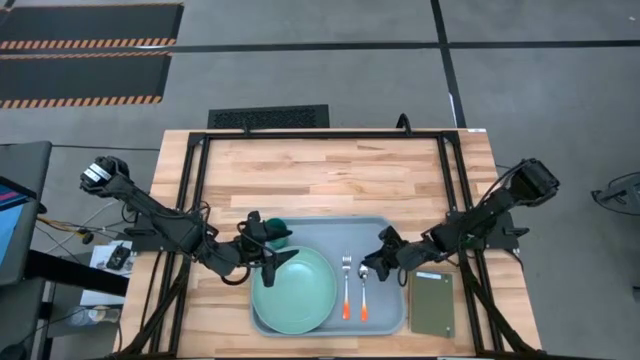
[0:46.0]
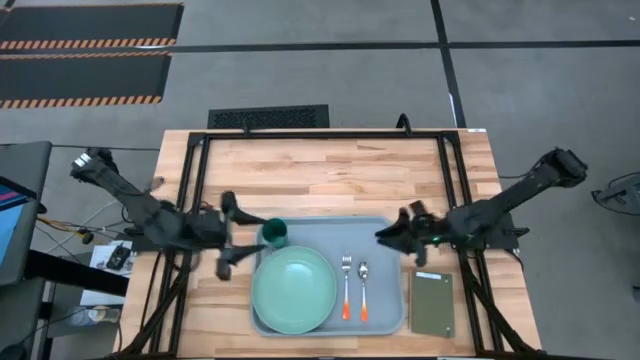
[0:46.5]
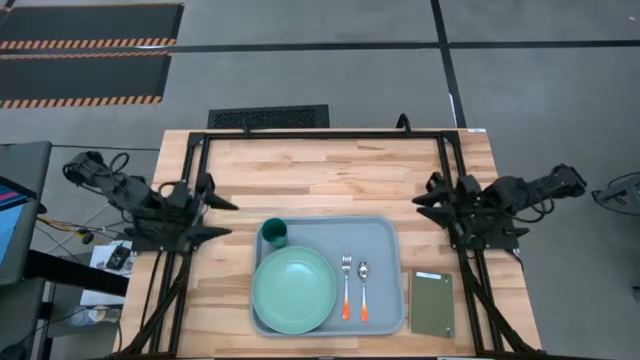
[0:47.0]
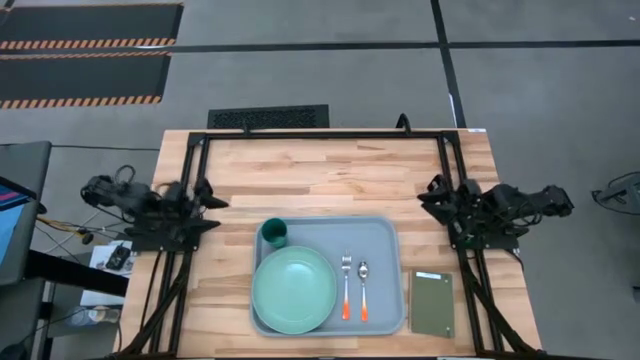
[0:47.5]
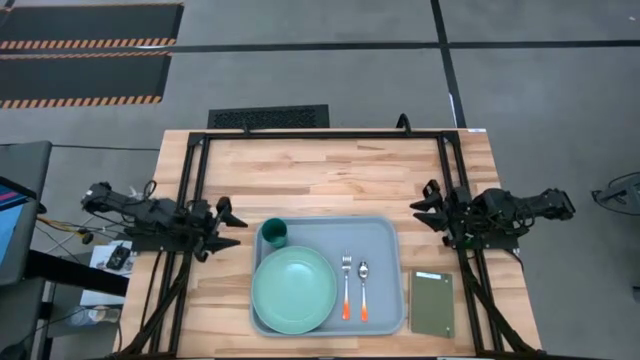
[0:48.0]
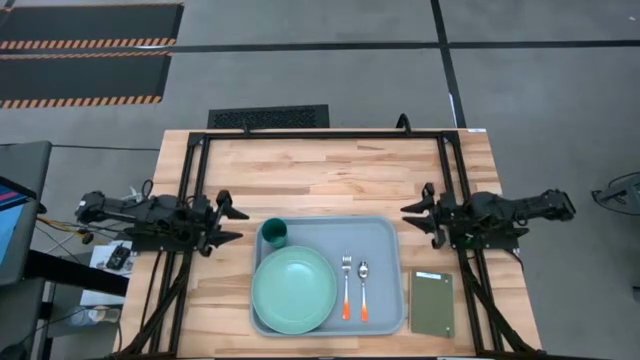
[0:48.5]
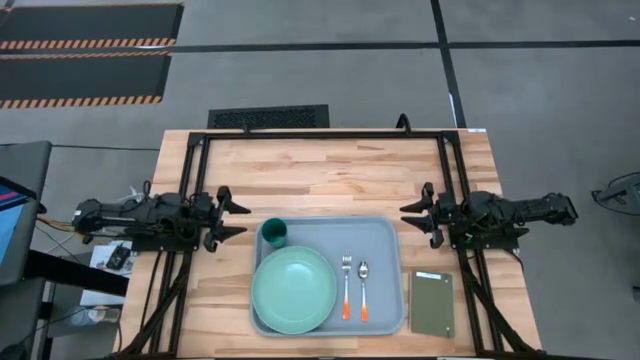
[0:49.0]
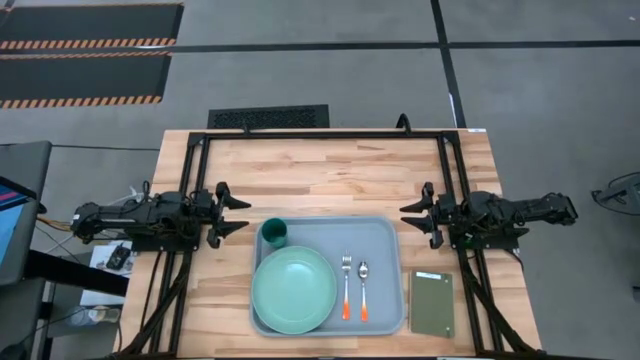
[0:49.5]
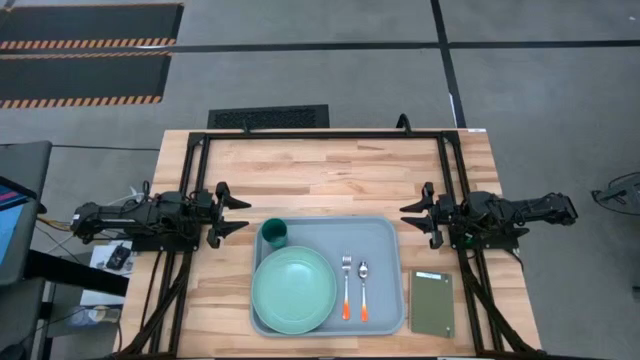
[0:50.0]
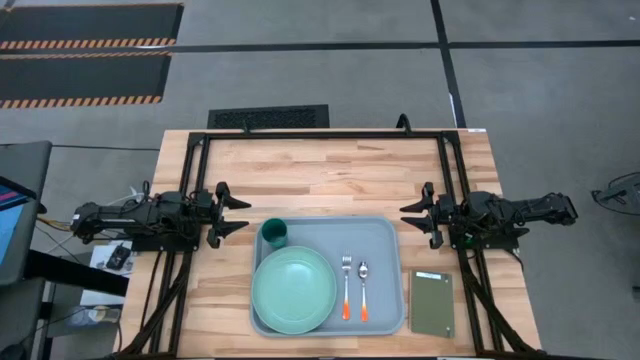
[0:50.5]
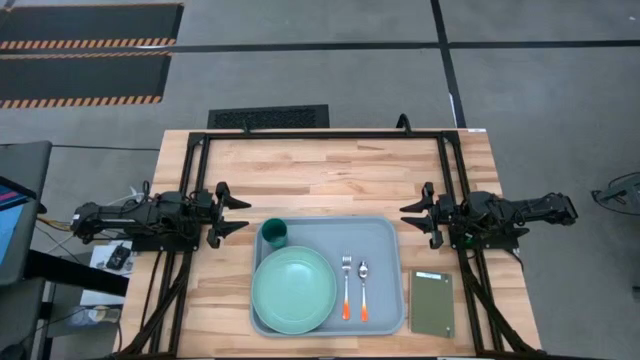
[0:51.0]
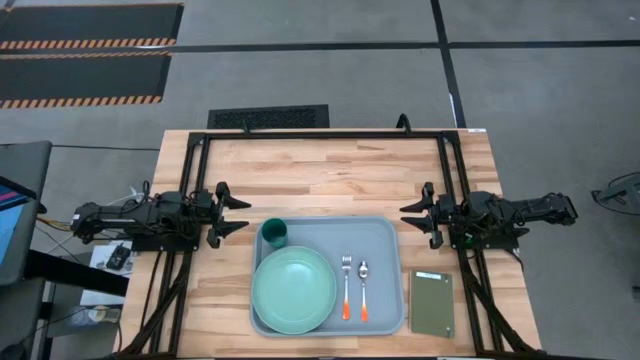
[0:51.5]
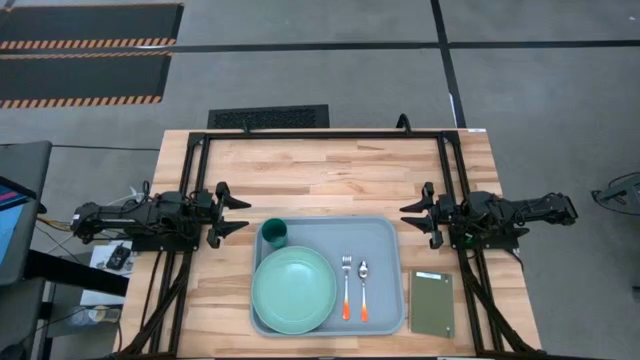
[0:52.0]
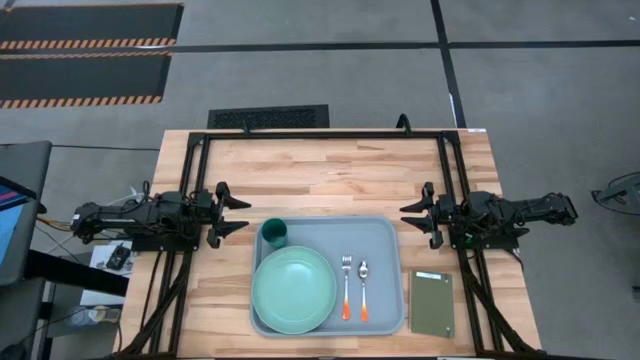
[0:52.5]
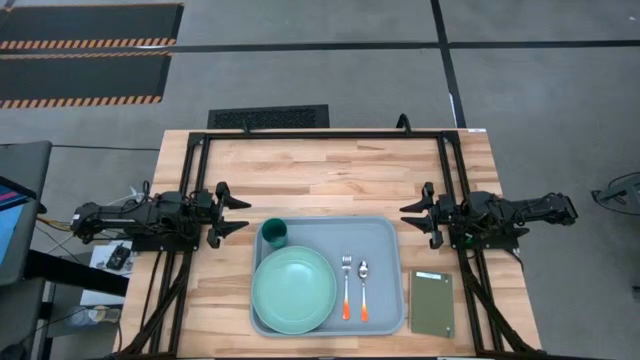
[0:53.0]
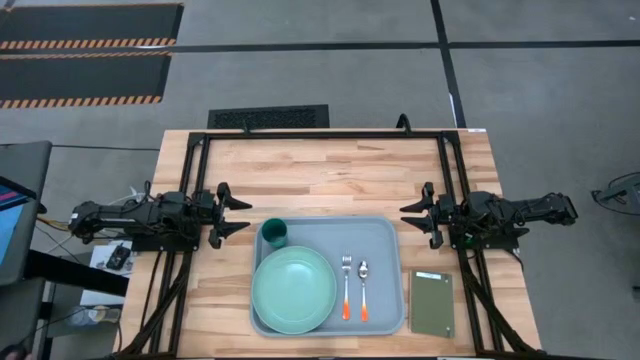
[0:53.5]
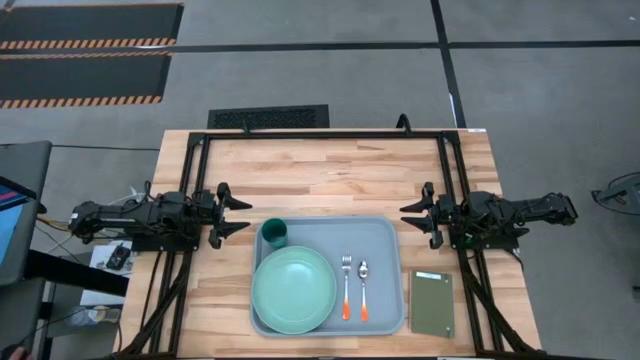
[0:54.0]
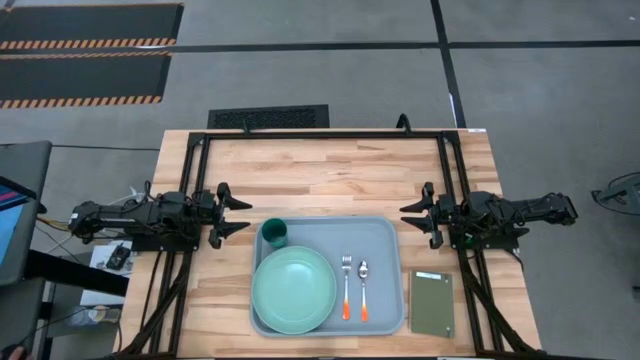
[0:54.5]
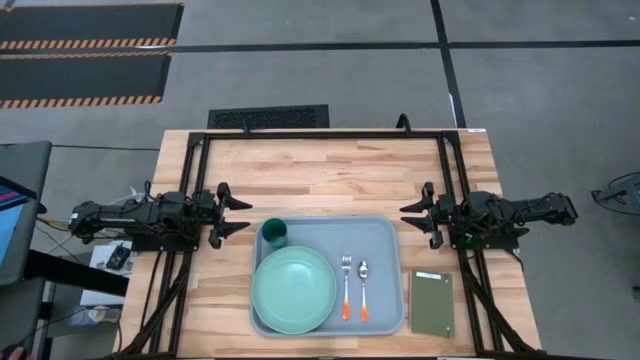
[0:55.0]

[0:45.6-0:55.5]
Task: Pick and place plate/cup/fork/spoon on tray
Return to Home Position

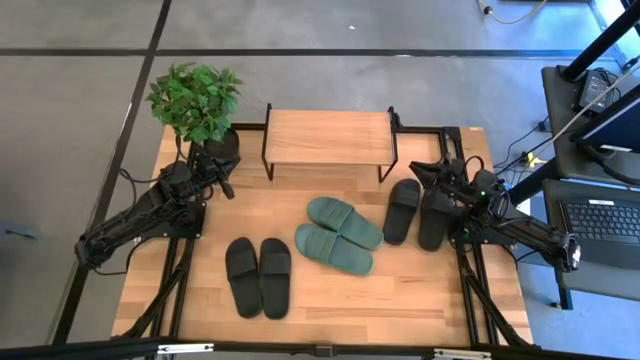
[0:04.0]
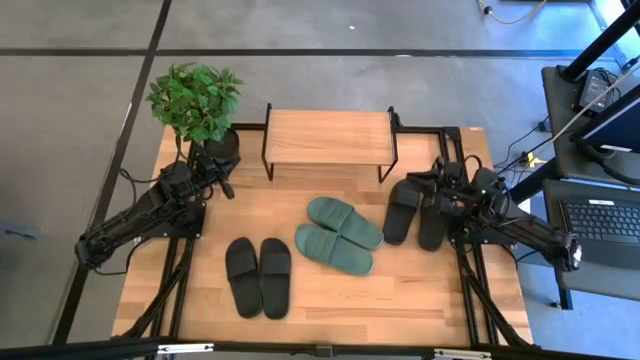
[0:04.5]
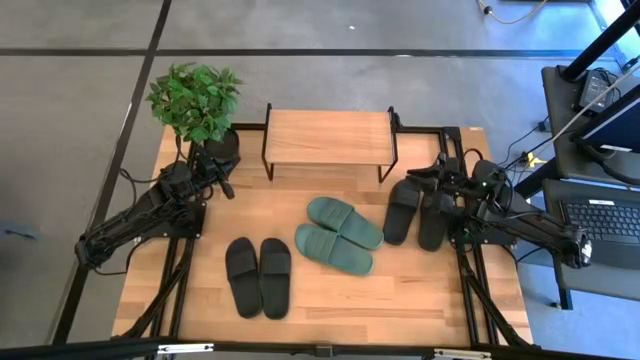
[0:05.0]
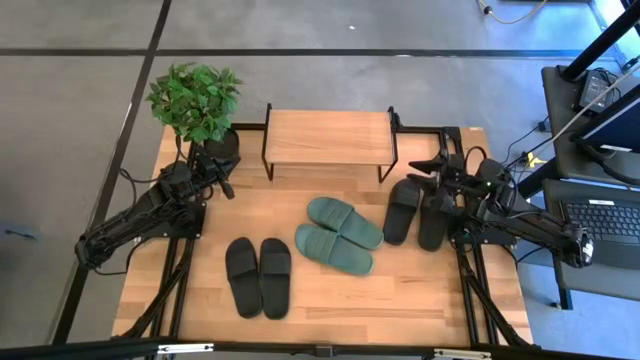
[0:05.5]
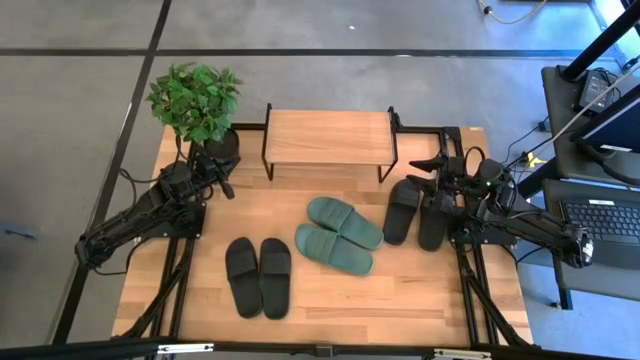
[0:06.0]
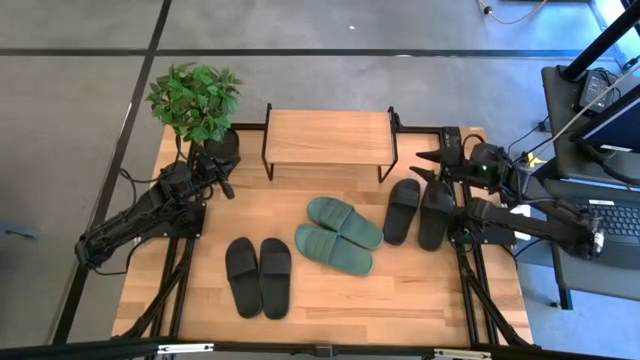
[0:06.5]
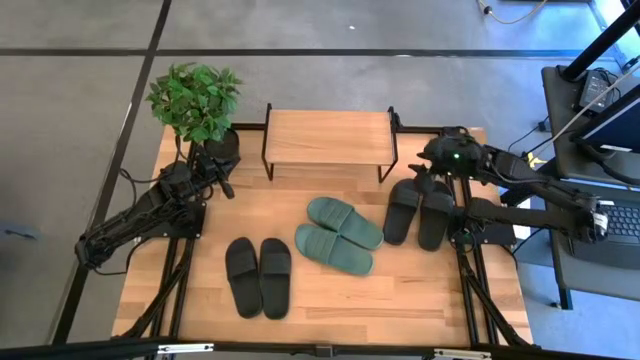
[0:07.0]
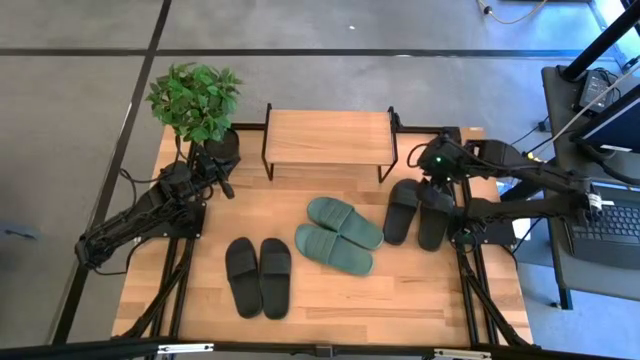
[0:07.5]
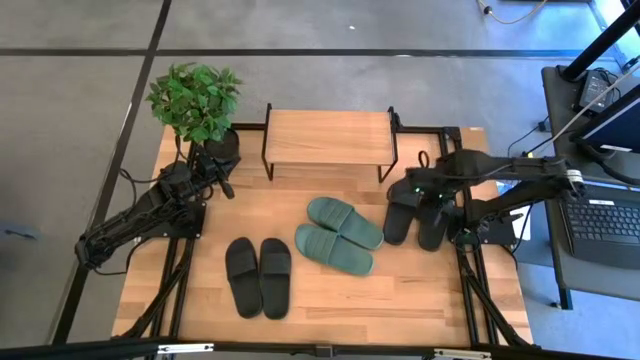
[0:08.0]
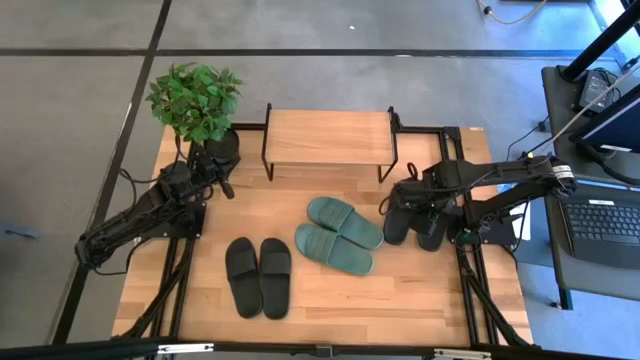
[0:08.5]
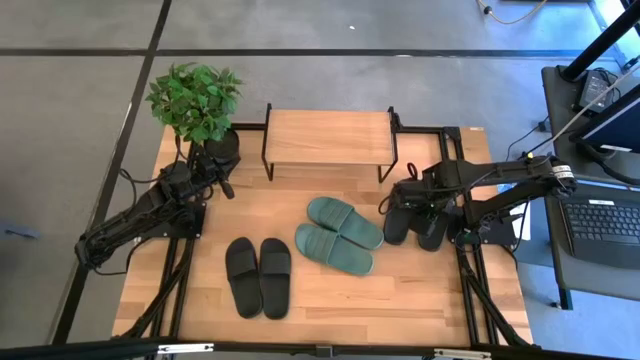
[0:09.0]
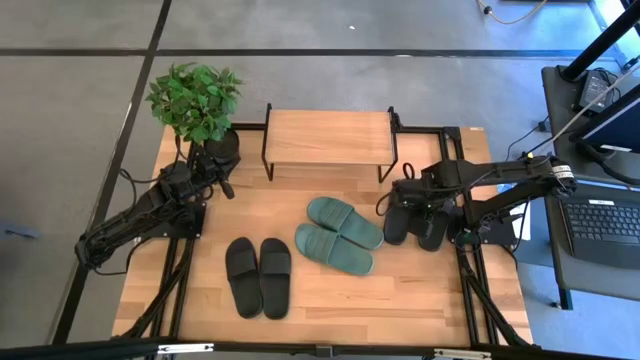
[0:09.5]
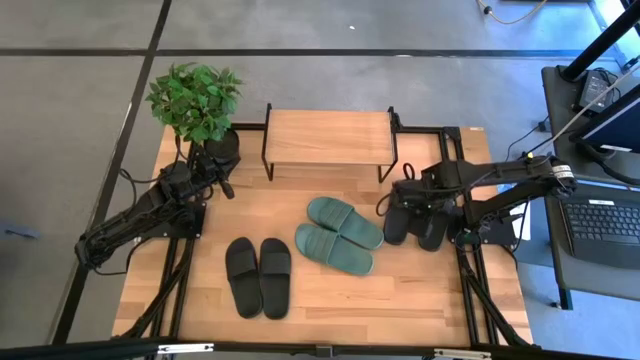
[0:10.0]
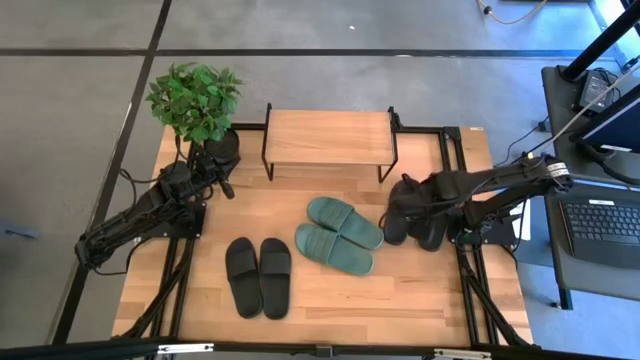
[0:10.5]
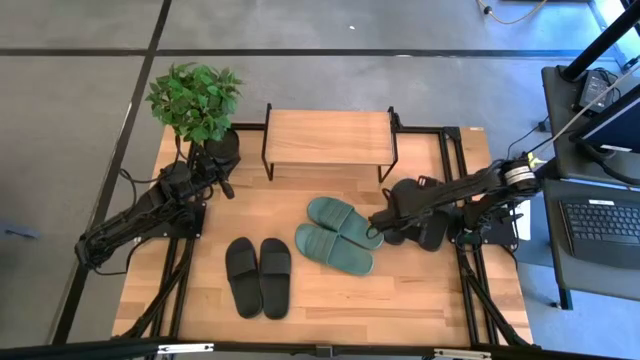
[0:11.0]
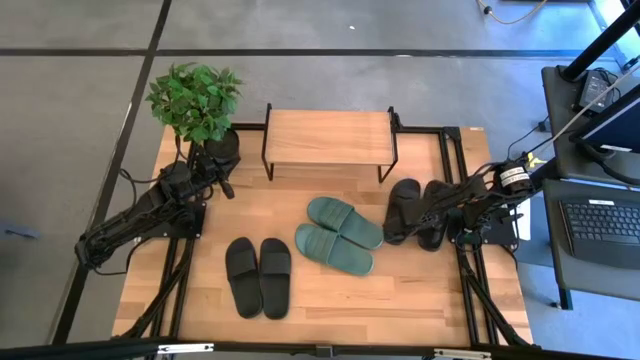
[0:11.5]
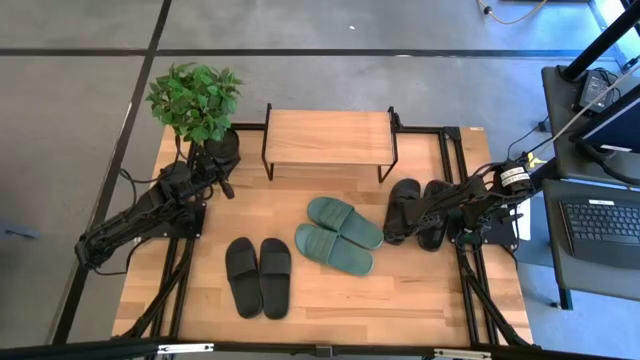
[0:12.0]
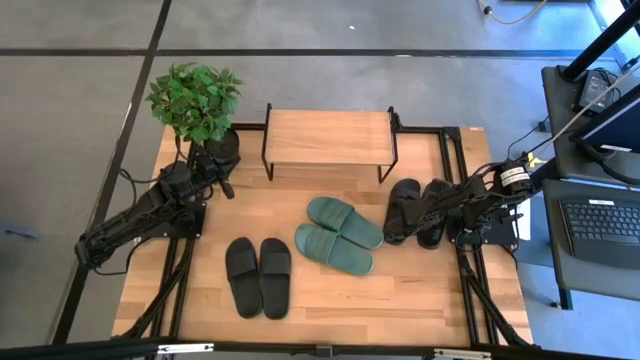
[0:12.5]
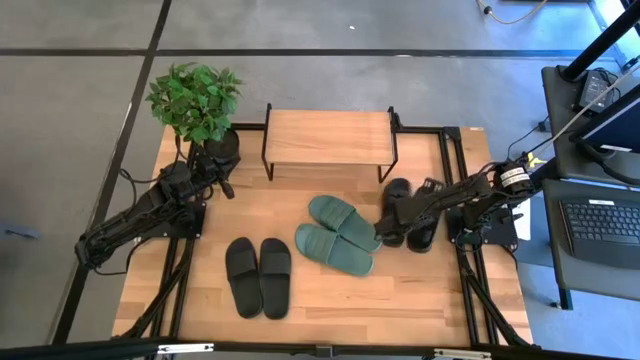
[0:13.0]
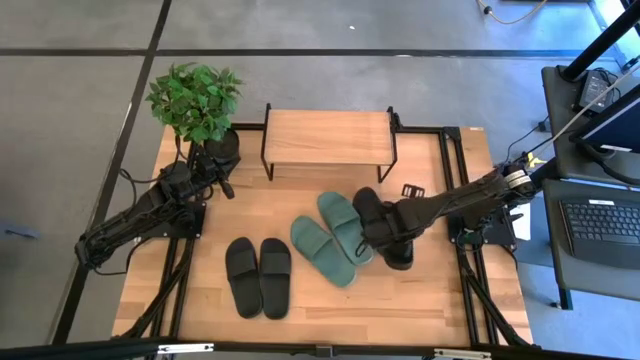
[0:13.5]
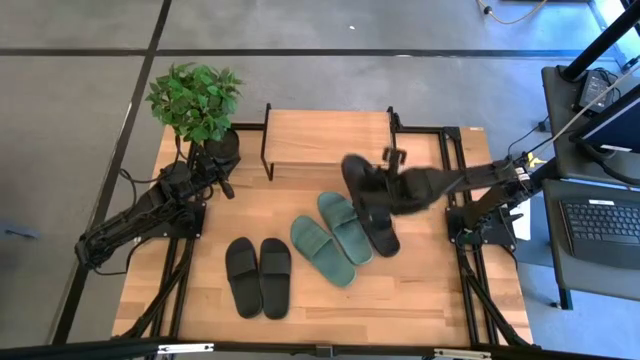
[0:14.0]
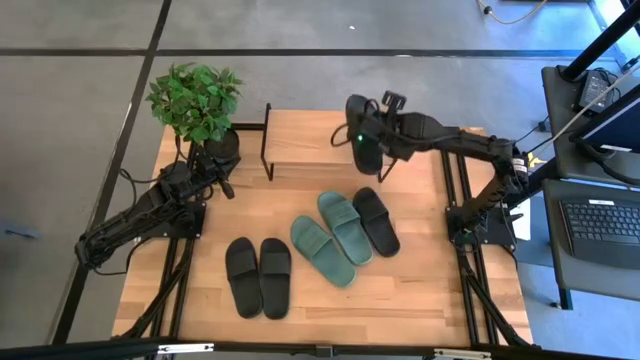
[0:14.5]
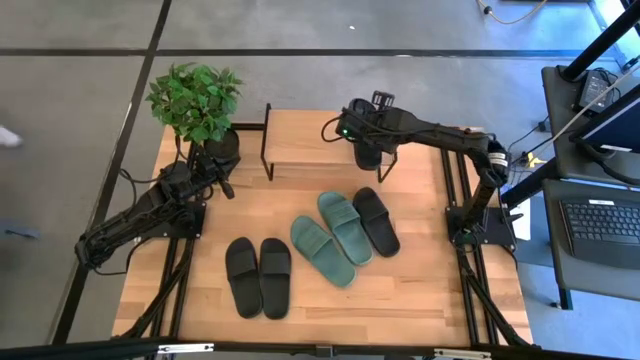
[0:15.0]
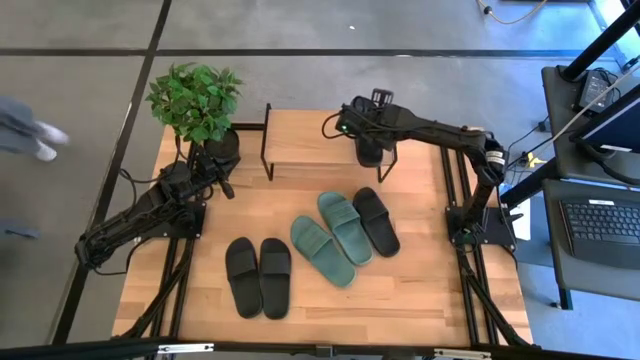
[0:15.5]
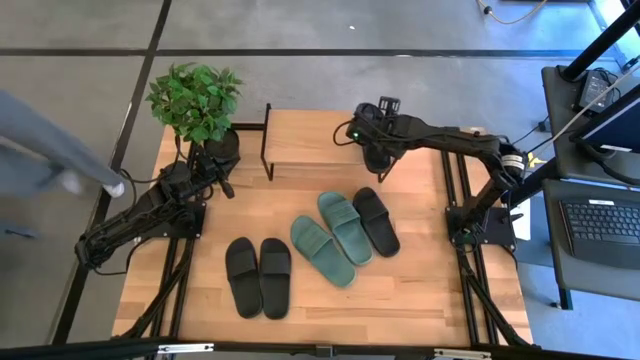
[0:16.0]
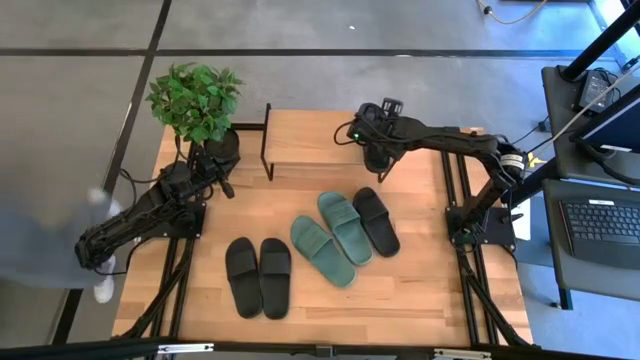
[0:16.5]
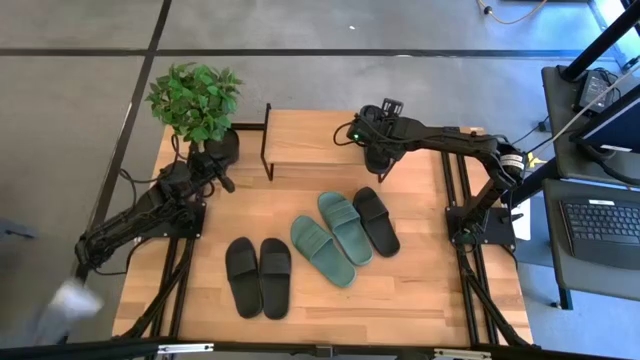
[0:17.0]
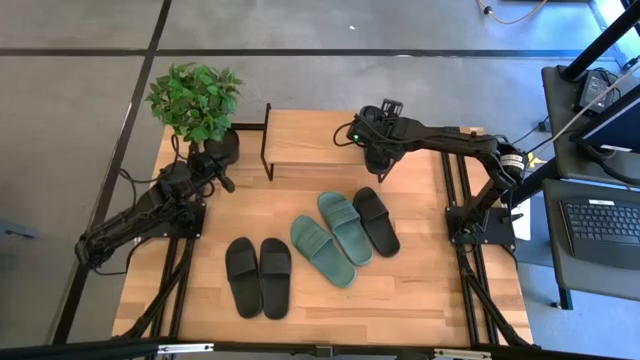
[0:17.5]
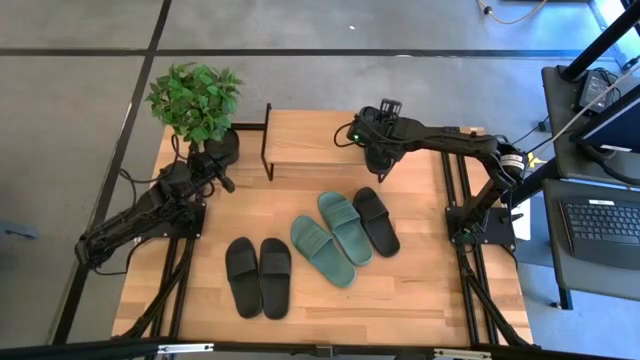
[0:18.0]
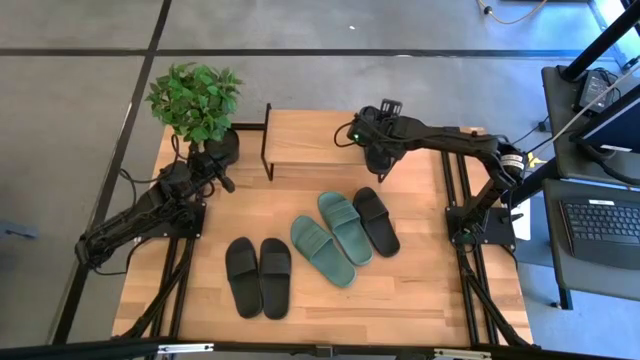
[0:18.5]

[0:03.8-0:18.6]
Task: Pick and place slides into the shelf
Put the black slide on the shelf
